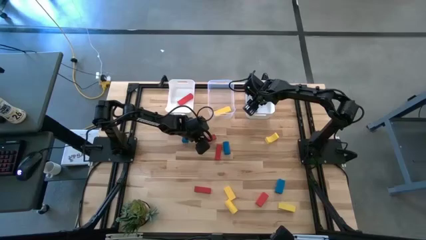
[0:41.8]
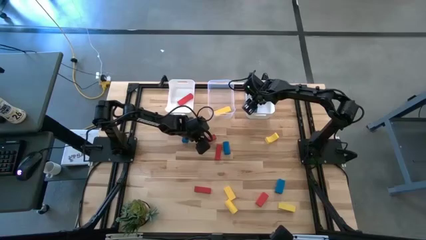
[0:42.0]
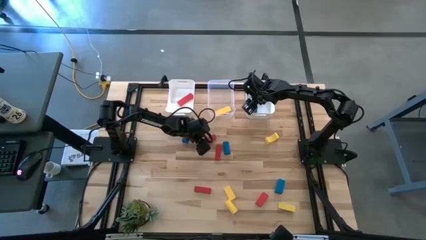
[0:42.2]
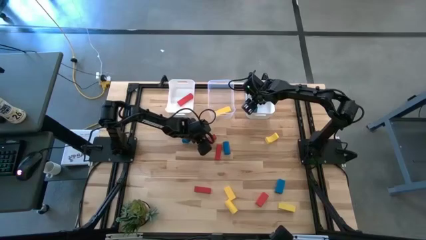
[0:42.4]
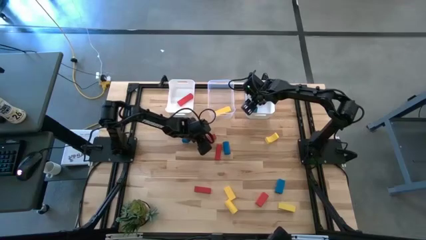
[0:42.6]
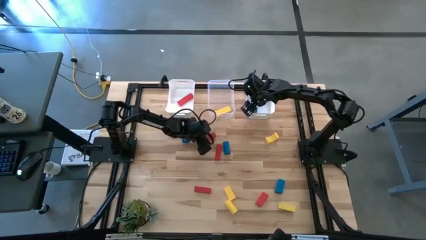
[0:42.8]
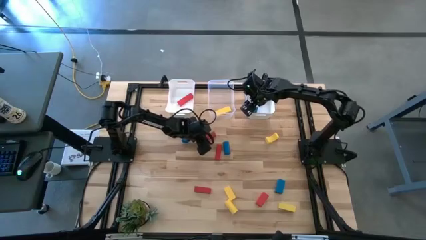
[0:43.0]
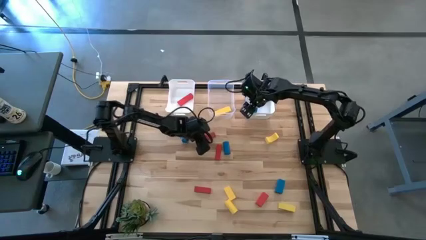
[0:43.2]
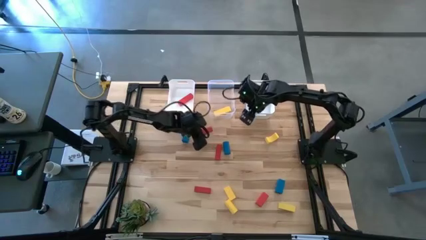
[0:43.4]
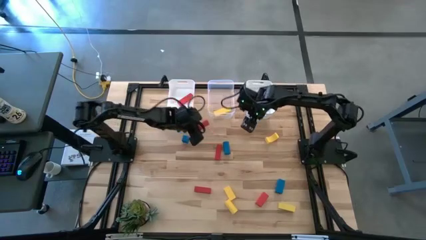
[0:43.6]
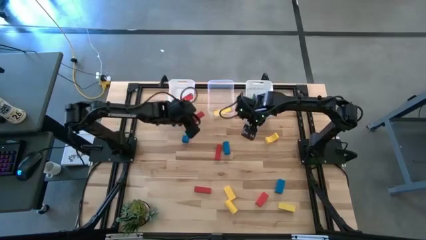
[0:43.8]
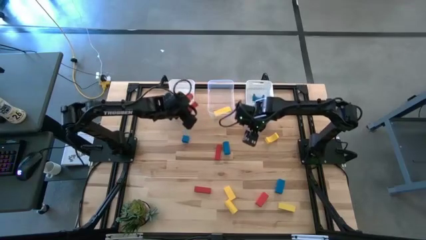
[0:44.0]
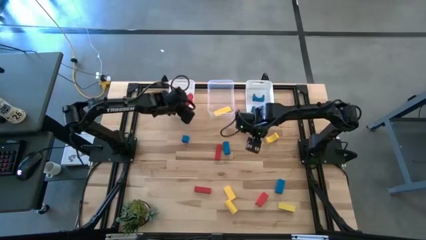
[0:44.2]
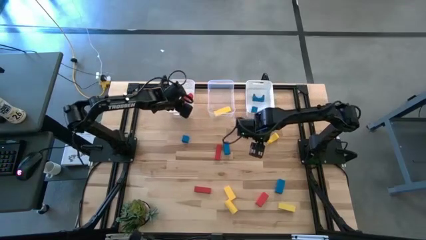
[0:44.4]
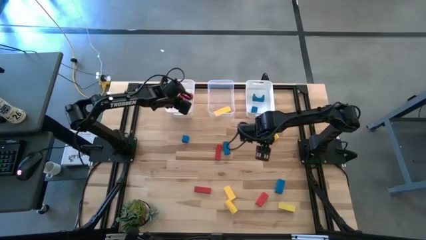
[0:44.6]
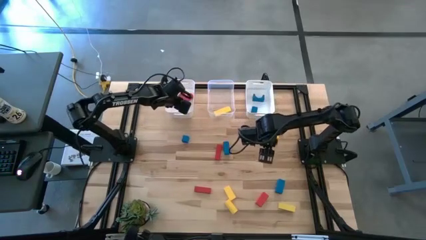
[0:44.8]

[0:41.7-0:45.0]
Task: Sort & place blocks by color
Put the red block into the left white bin

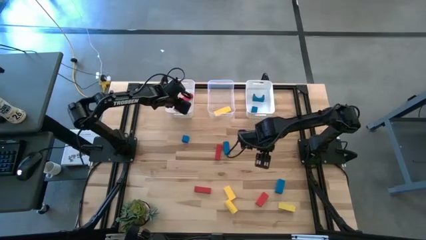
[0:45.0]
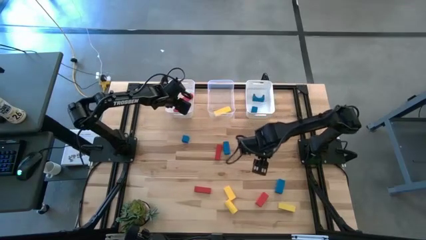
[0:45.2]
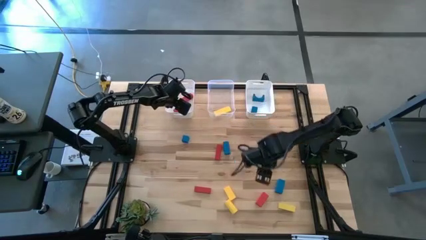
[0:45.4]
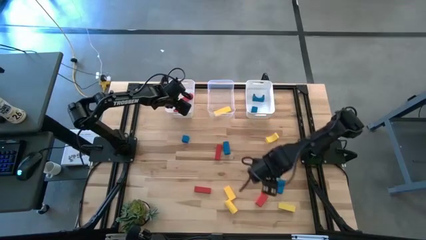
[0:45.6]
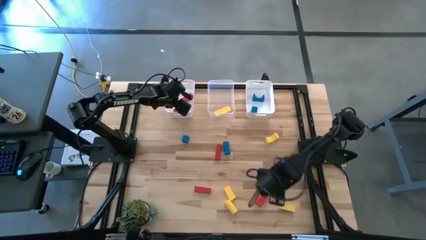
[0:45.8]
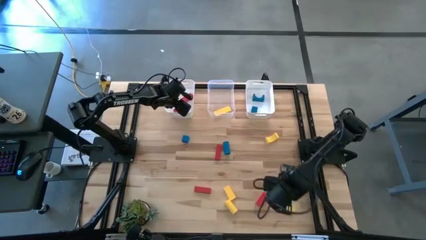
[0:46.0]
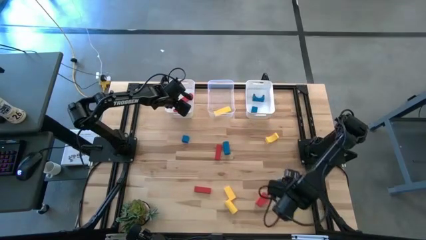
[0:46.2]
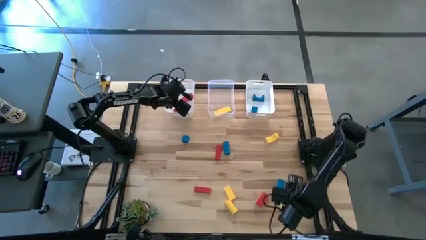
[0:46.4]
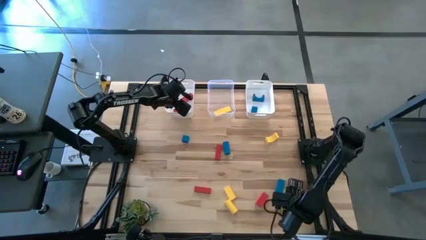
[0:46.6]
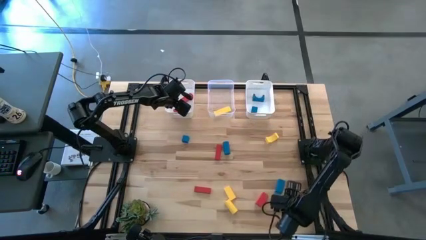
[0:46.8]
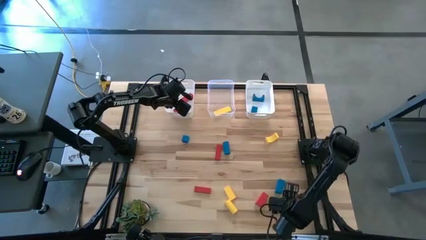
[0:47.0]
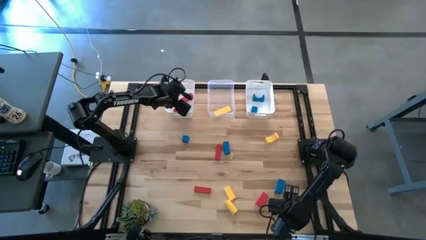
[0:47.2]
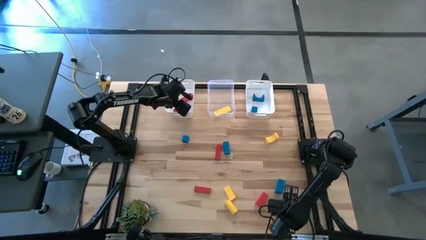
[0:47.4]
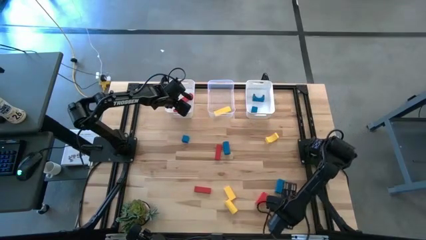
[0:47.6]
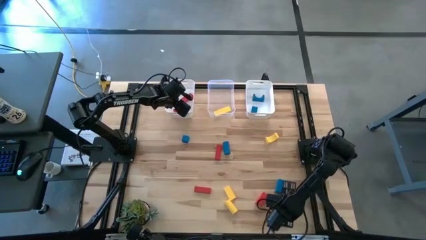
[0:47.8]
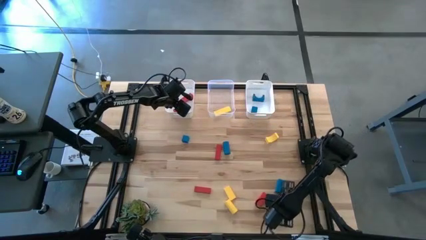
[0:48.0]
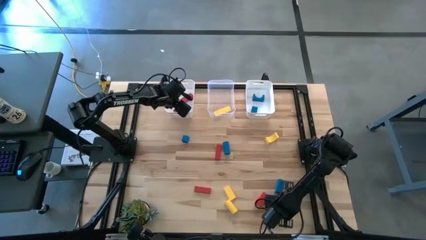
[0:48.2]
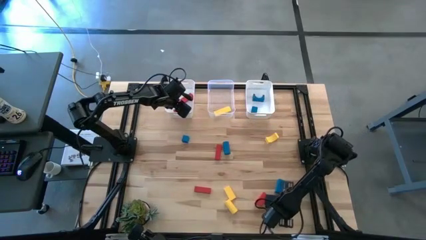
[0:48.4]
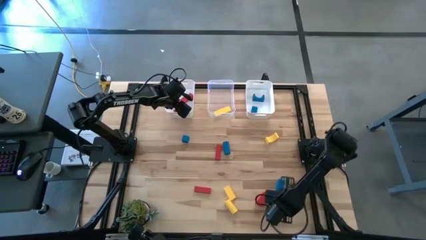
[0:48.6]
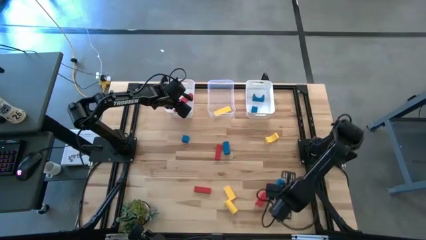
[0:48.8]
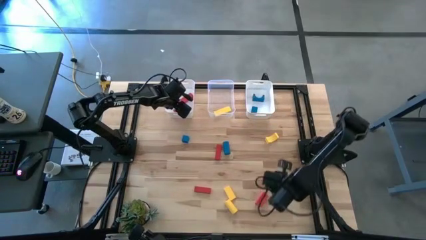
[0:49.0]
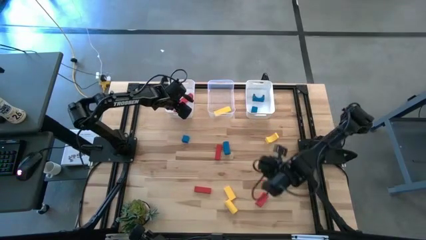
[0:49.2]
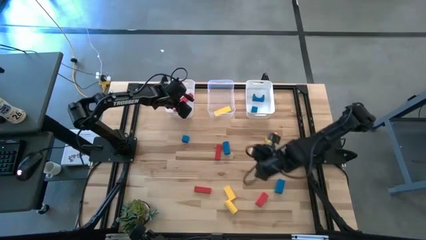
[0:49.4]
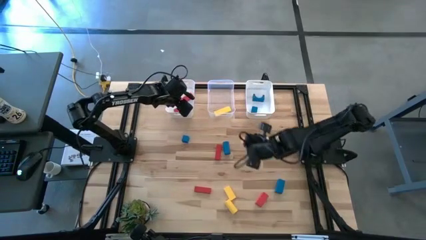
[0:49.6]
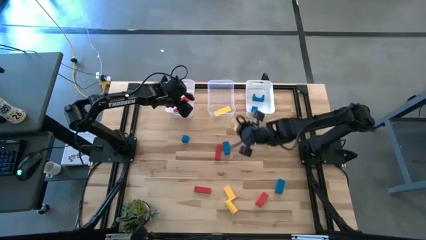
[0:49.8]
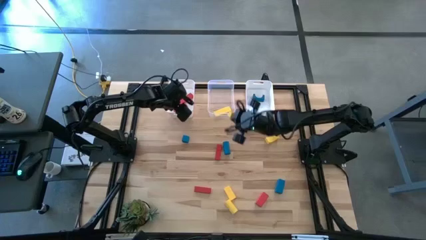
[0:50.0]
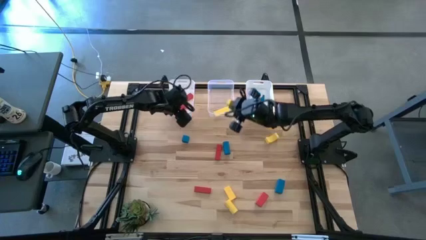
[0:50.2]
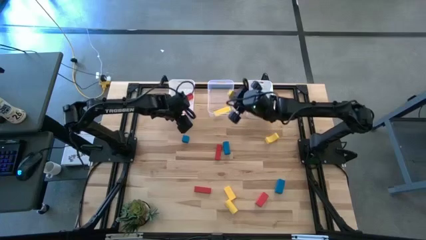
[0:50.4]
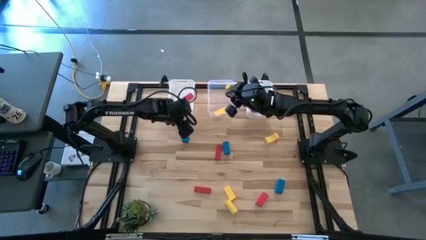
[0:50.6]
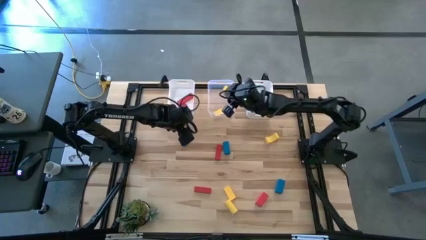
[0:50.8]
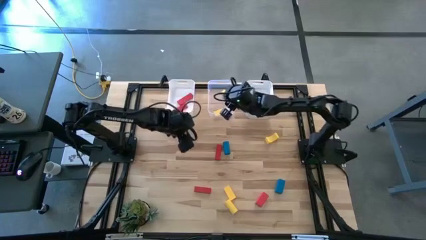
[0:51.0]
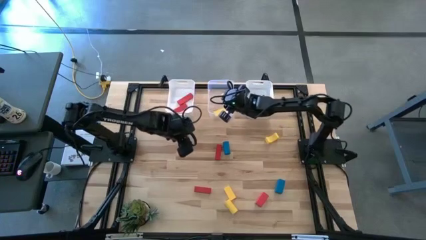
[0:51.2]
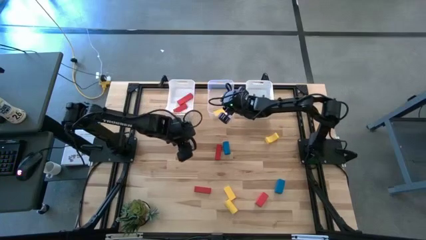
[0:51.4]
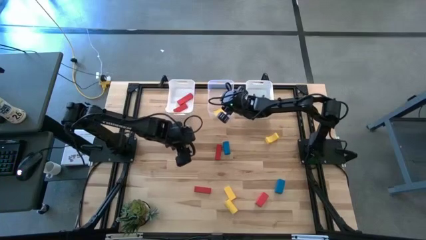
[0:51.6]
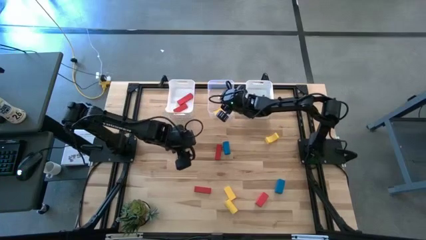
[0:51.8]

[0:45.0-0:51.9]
Put the yellow block into the transparent bin

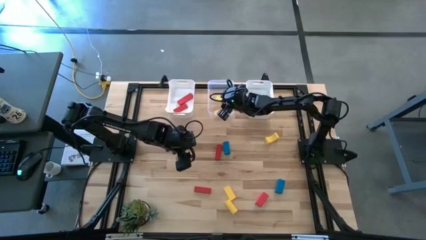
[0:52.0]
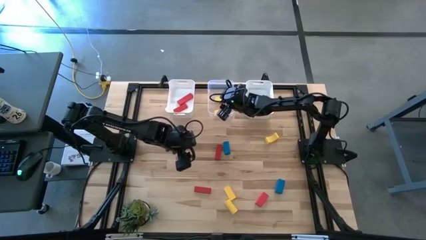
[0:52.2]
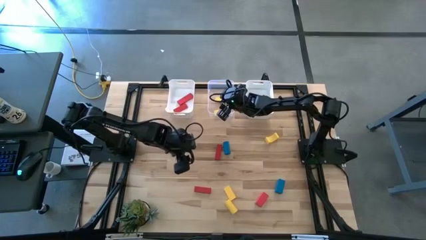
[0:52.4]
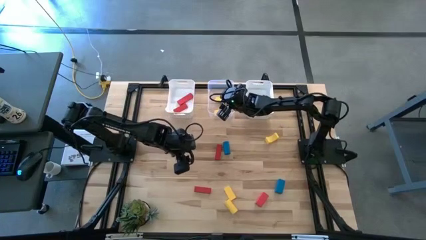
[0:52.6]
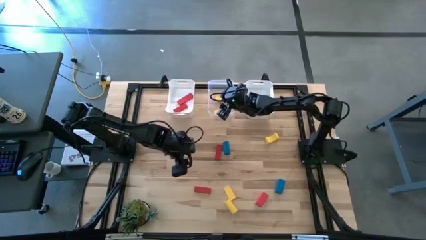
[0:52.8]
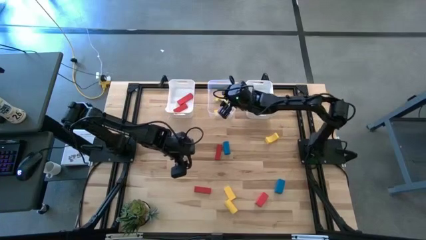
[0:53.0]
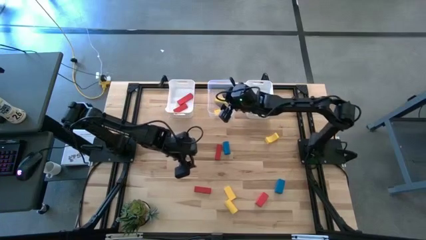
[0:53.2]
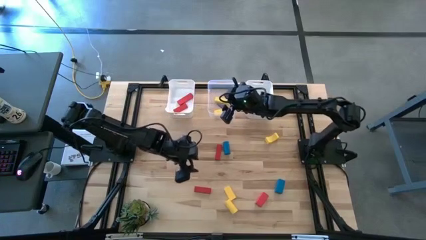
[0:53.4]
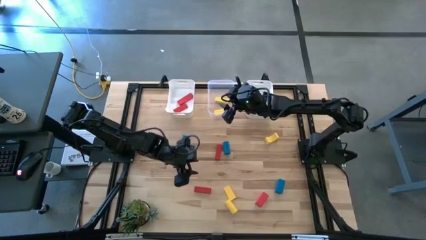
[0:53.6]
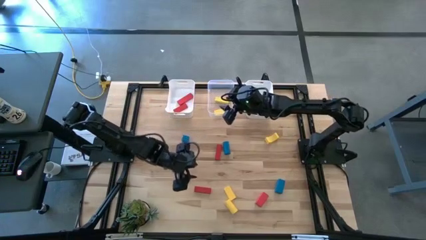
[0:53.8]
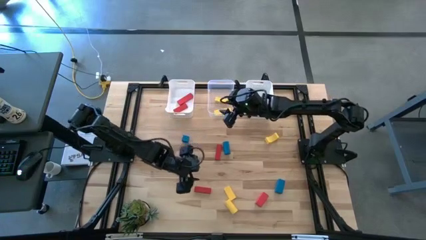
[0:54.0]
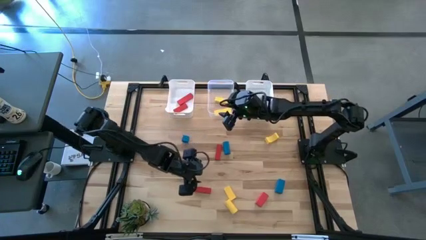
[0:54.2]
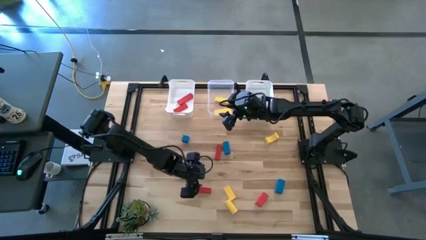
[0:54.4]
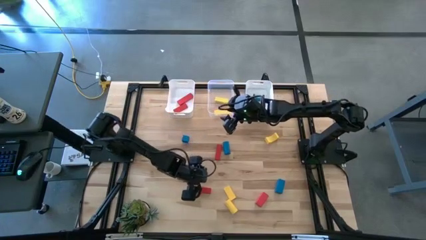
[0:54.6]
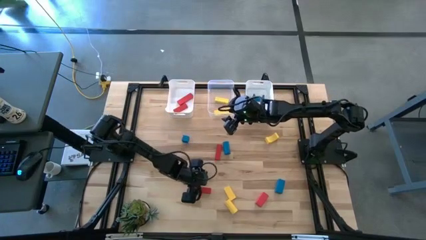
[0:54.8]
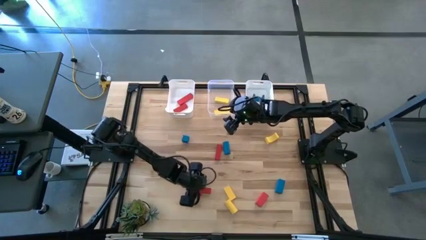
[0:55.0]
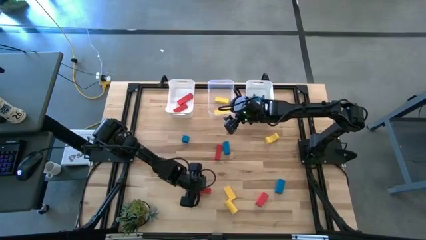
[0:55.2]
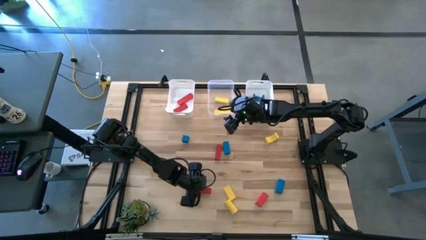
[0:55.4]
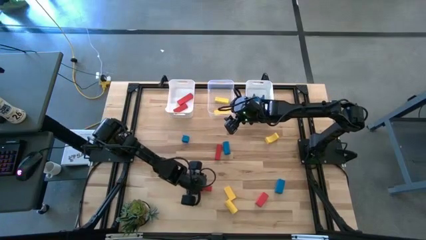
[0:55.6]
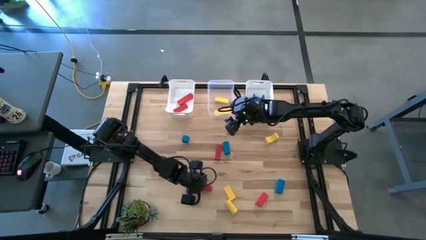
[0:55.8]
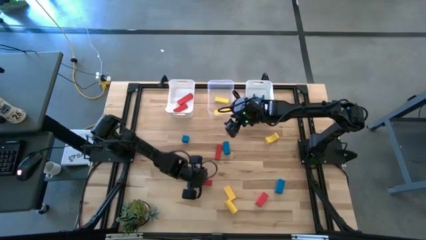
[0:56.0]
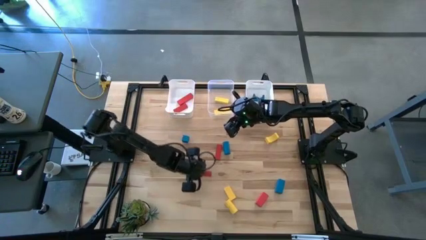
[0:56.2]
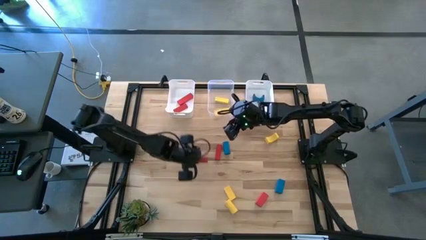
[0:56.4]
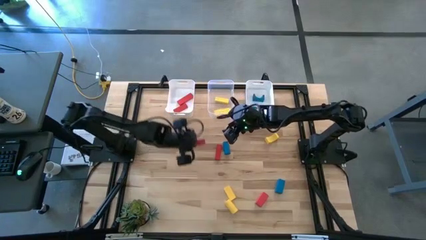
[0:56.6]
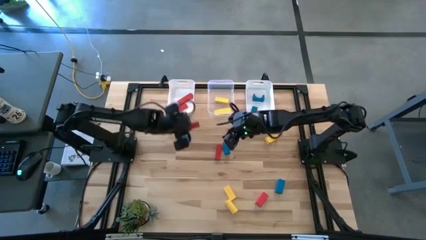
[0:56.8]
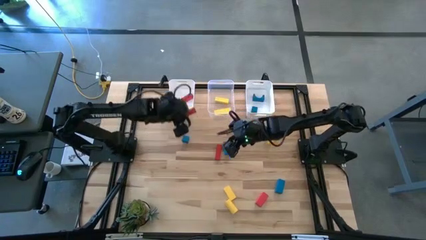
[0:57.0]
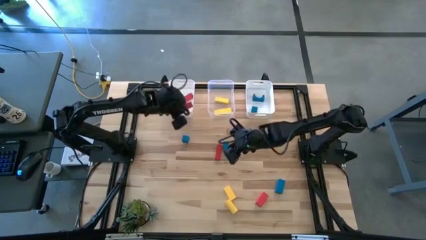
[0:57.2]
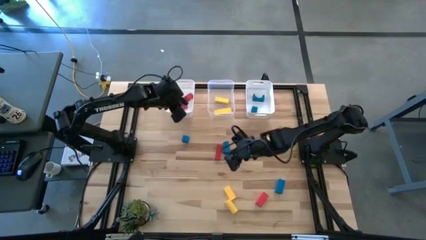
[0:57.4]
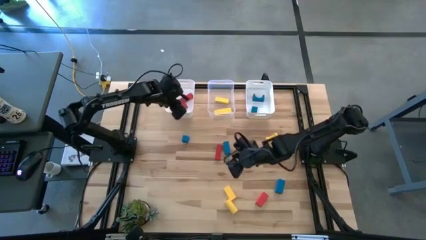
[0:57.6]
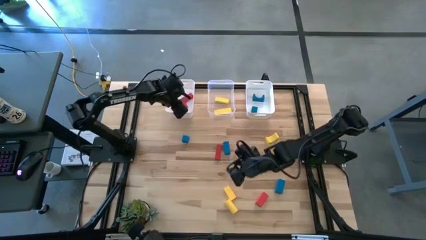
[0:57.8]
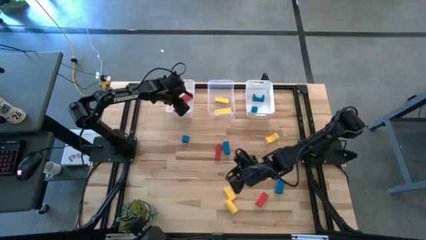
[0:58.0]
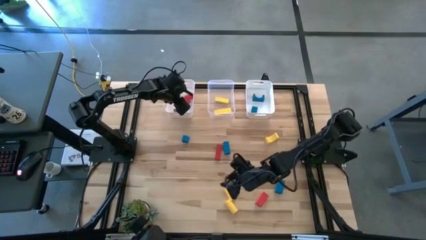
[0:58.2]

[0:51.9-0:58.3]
Put the red block into the left white bin
